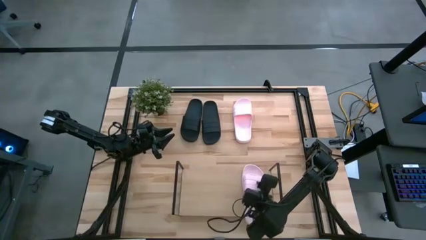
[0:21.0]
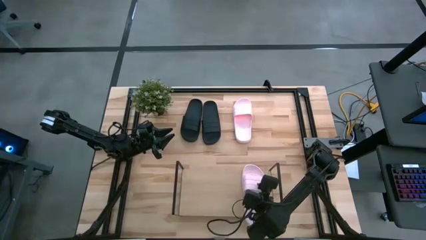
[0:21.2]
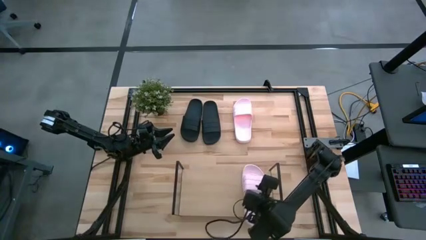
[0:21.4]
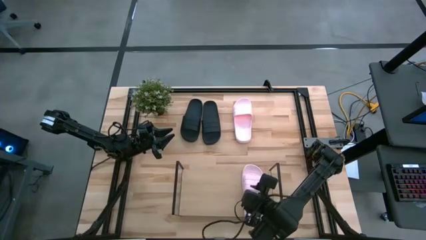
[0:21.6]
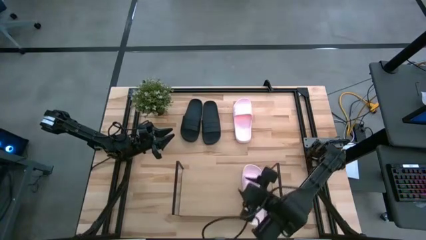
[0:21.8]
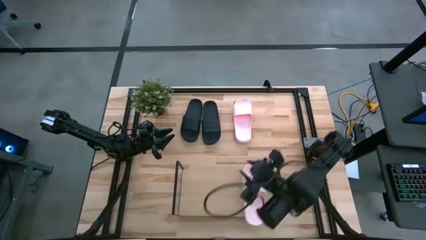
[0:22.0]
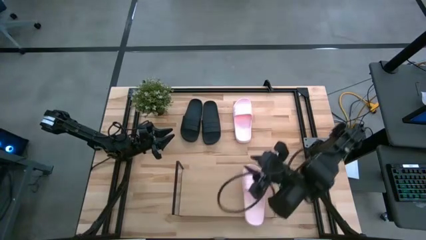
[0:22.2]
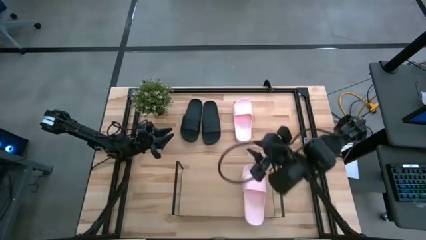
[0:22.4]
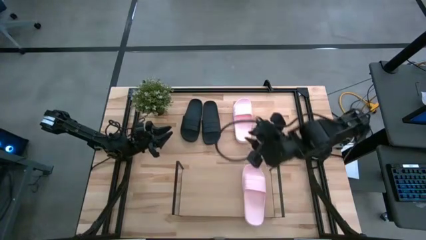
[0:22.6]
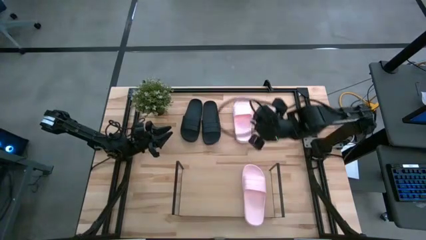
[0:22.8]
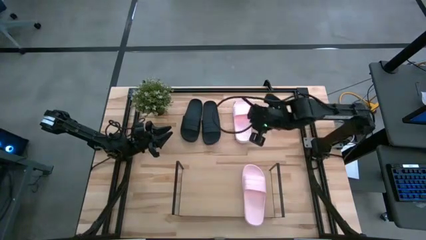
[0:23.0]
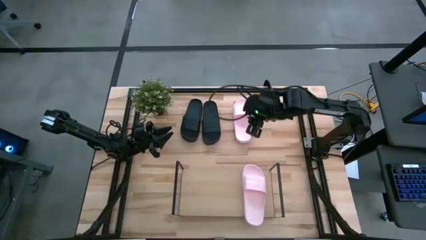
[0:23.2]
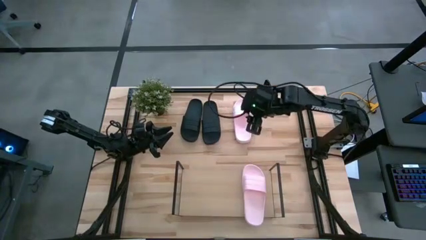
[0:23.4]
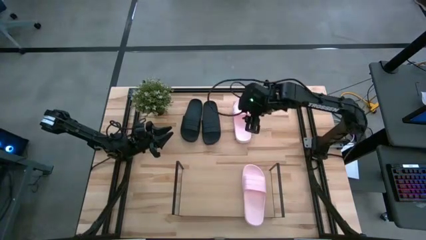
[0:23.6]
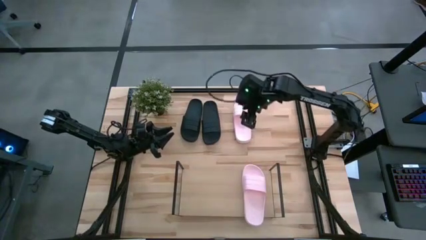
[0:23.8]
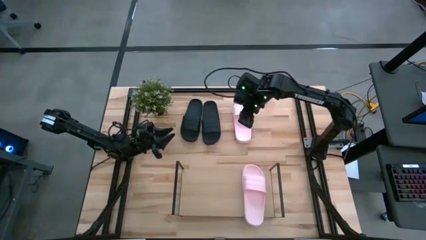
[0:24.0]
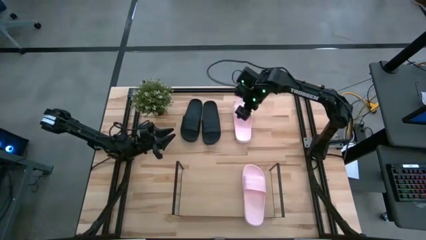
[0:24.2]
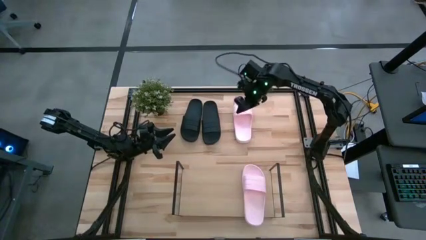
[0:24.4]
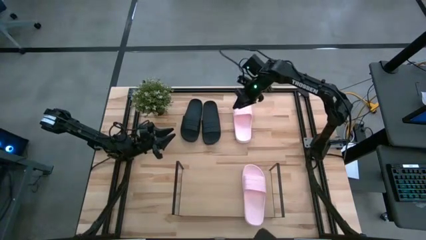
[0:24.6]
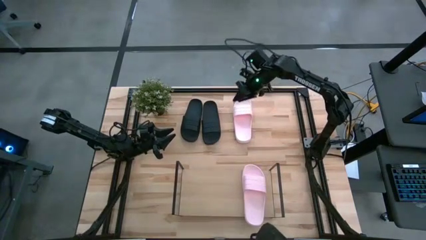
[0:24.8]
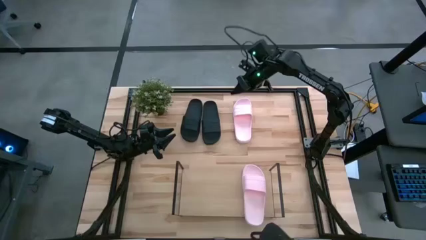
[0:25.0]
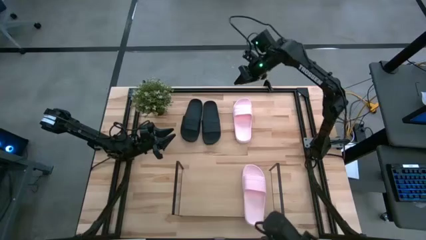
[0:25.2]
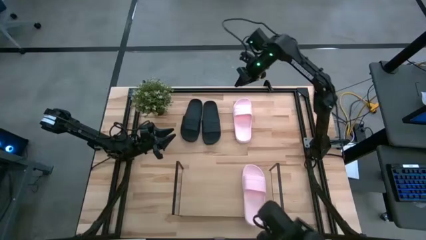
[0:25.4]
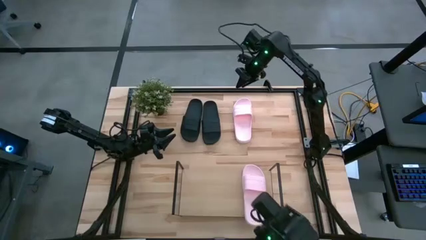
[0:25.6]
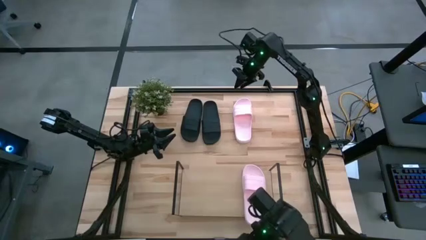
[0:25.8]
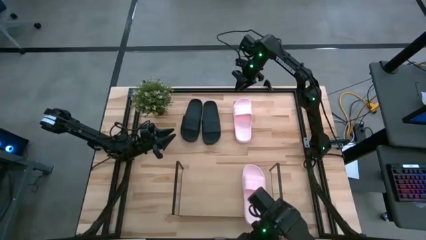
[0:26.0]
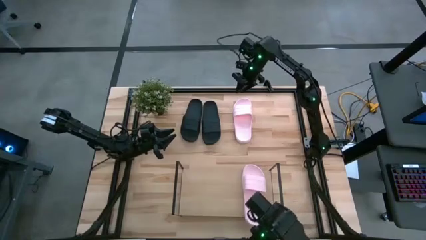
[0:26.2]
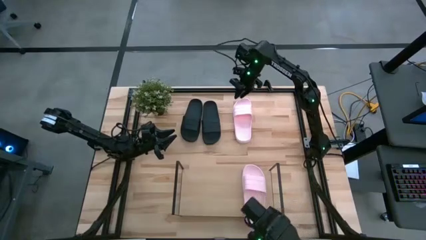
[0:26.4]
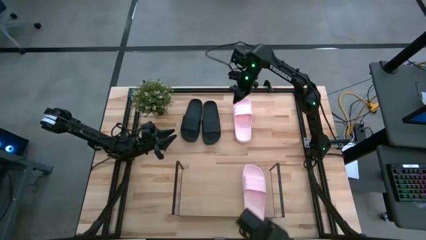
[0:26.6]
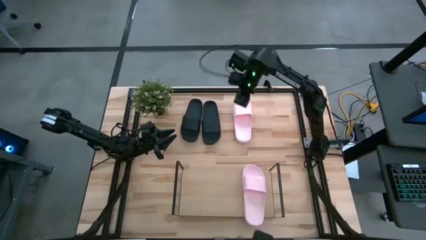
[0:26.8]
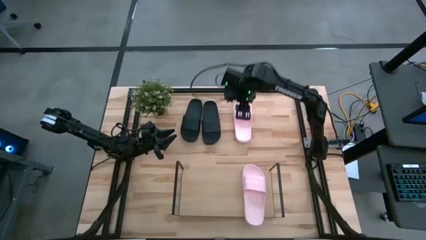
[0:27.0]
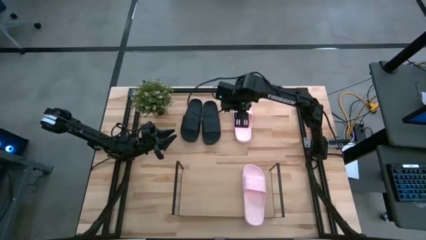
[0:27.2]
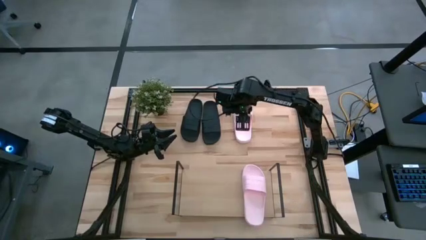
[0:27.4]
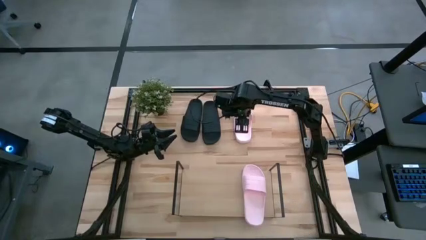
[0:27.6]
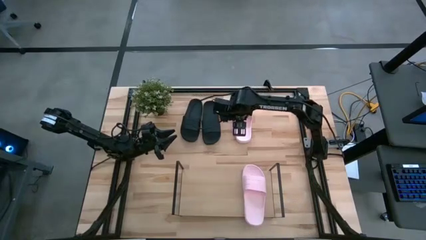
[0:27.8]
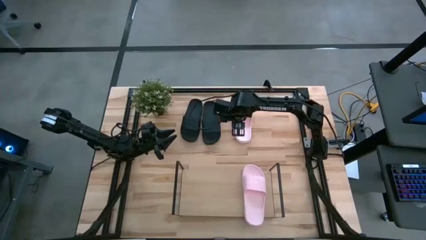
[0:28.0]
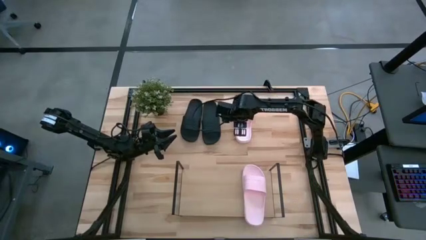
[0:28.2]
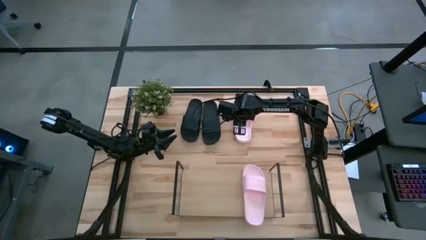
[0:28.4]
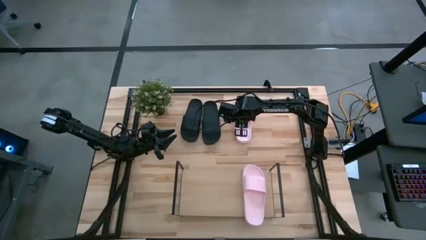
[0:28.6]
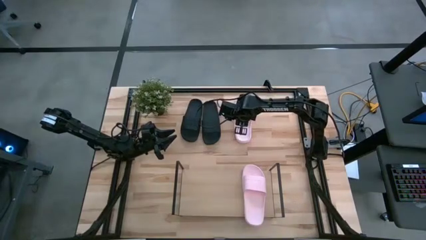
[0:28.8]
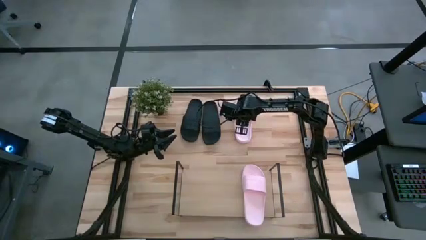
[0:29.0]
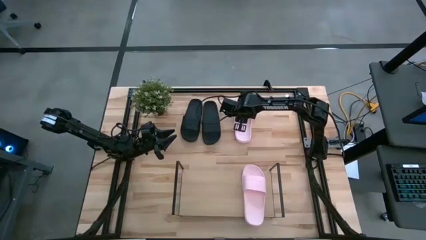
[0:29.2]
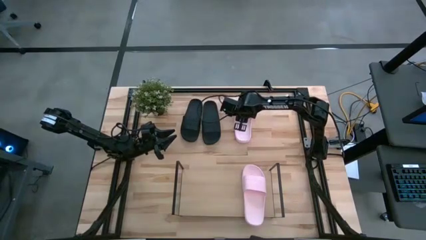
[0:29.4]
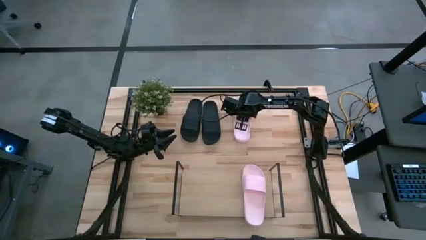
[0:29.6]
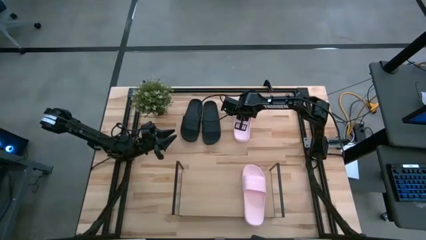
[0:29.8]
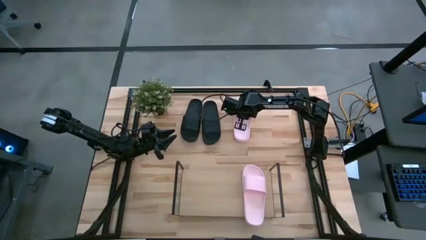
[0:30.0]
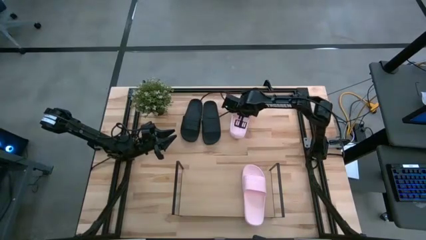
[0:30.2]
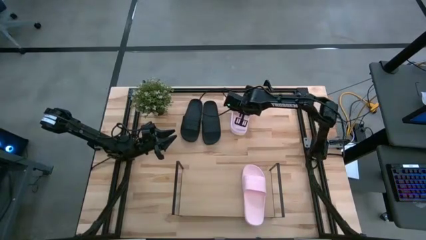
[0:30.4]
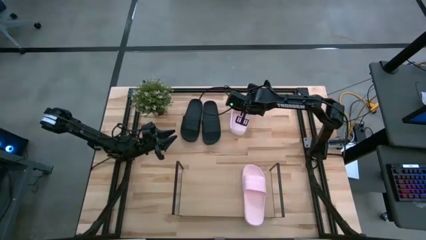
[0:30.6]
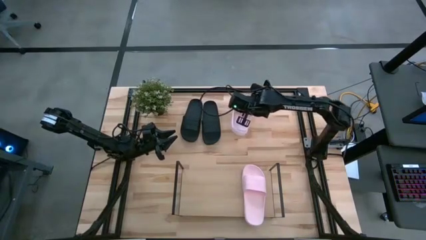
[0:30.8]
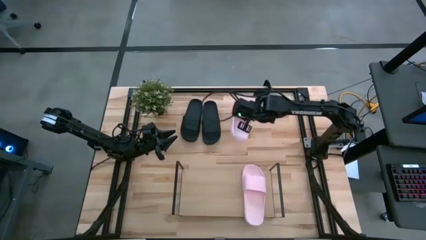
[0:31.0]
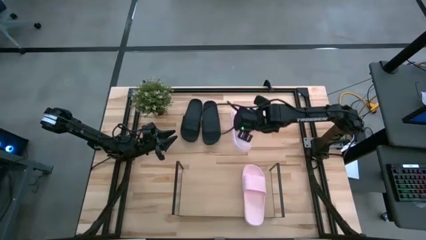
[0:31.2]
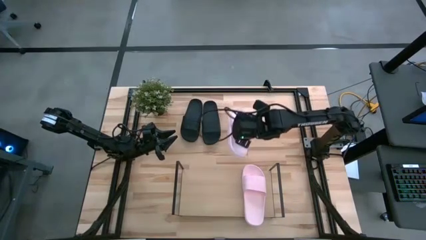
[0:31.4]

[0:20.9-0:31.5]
Task: Pick and place slides into the shelf
Put the pink slide on the shelf
